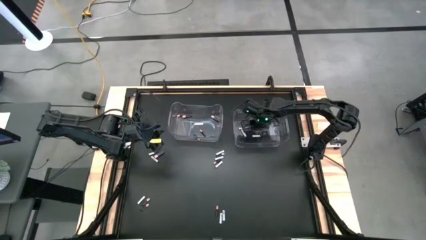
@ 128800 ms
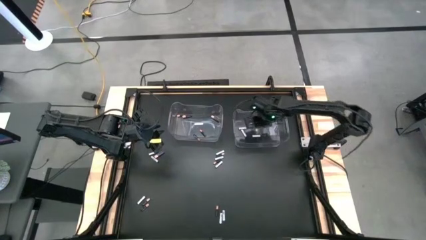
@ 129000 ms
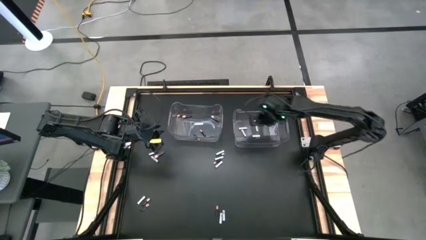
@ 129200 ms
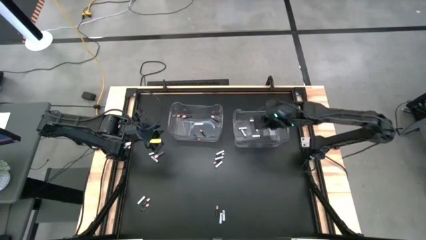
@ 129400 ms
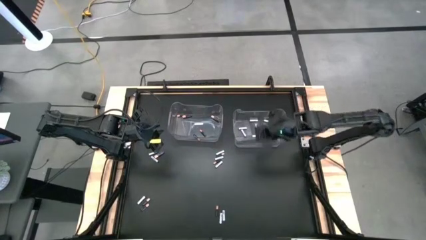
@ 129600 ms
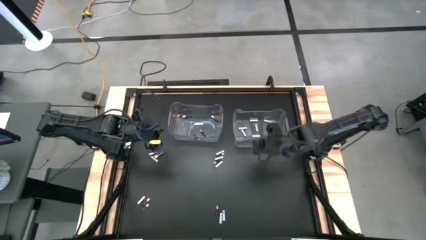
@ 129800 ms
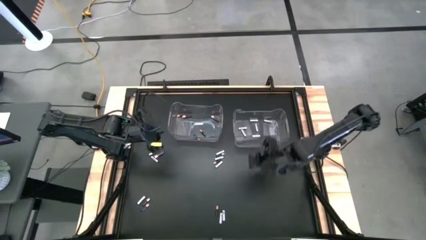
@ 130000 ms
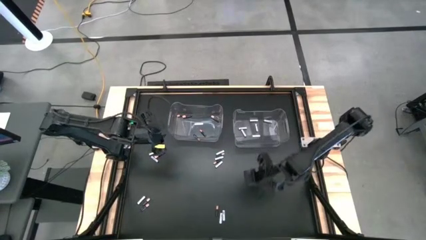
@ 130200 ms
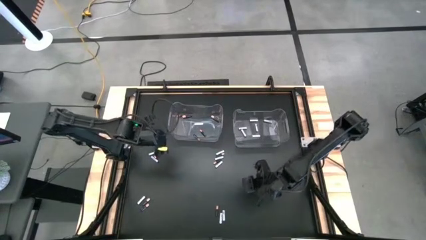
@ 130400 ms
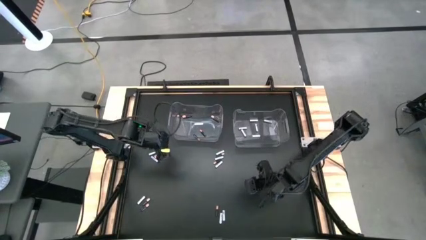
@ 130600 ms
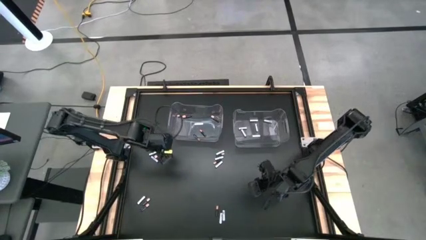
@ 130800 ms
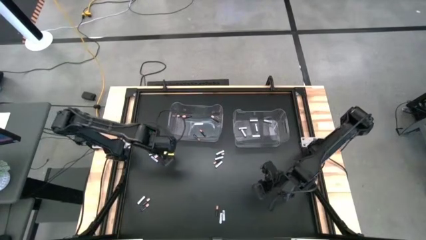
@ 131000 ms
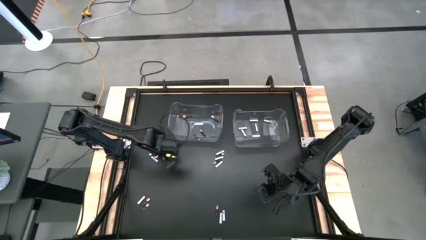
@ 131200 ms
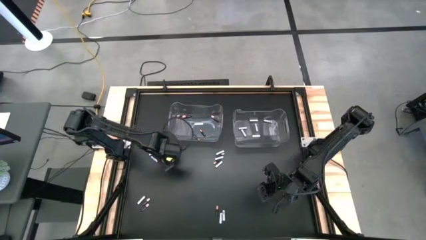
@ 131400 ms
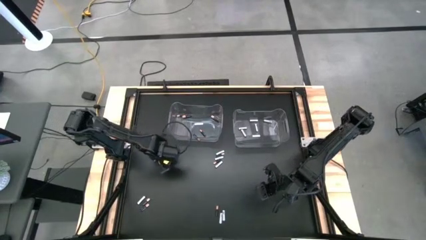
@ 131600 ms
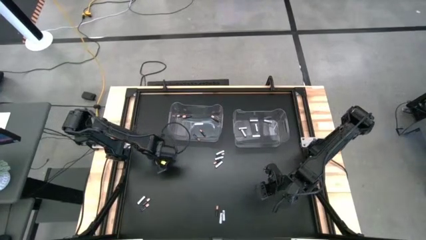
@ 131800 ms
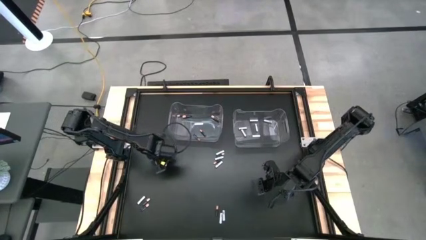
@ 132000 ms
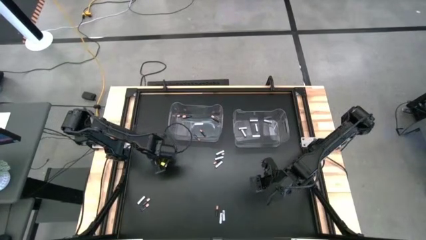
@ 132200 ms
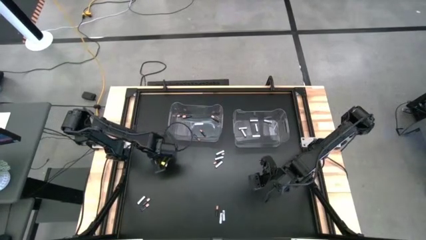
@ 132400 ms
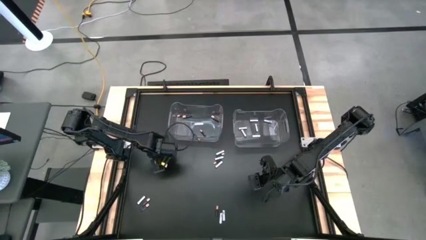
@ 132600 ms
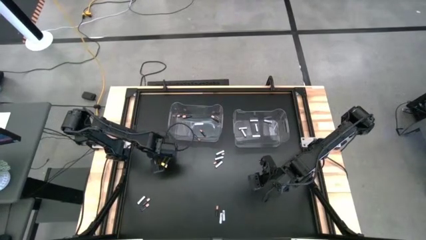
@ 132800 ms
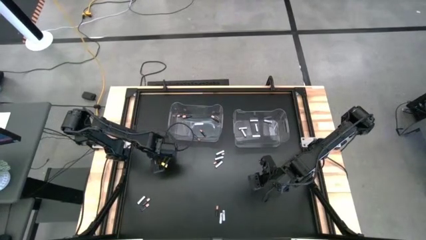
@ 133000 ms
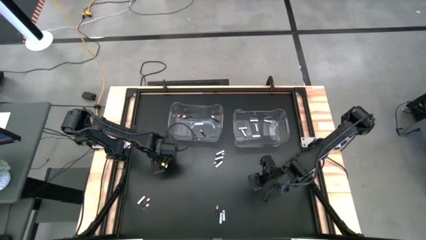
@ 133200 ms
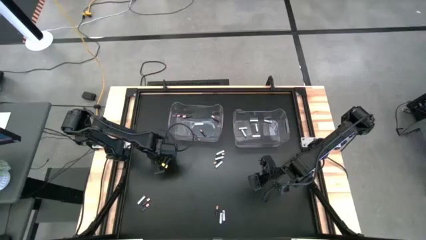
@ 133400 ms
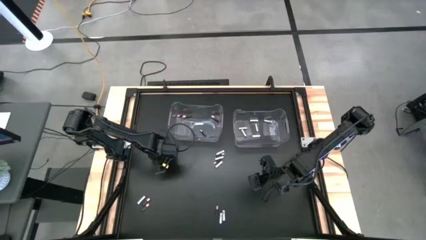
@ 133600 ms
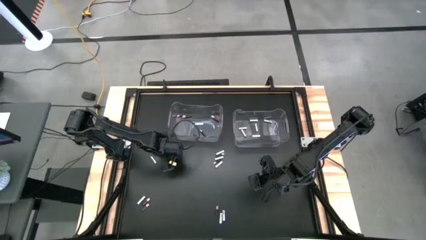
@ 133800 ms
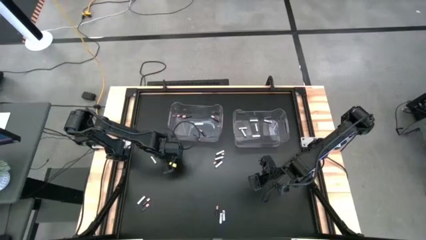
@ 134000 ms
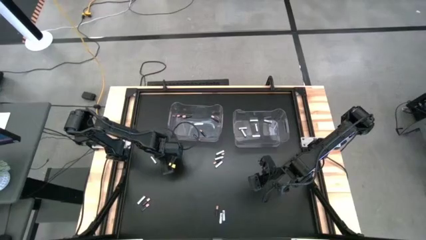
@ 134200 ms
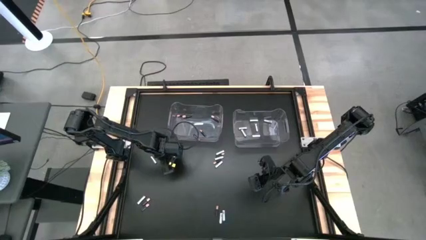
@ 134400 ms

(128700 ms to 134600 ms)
Task: Sort batteries
Put the black battery into the left transparent bin

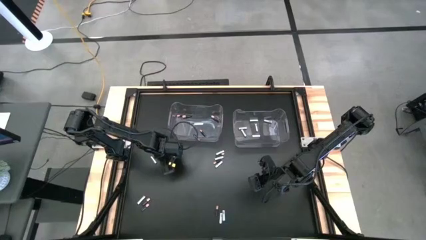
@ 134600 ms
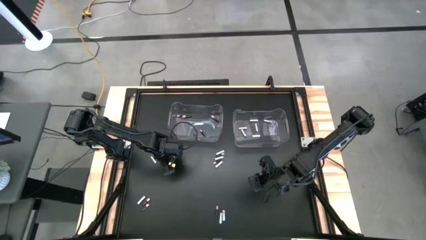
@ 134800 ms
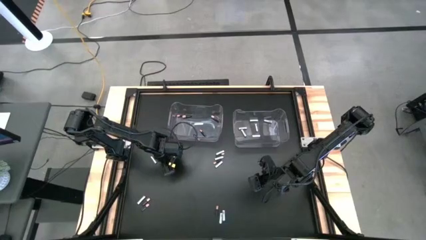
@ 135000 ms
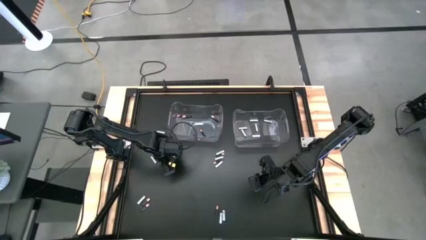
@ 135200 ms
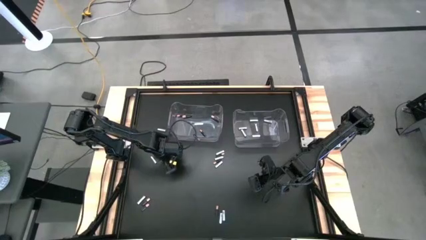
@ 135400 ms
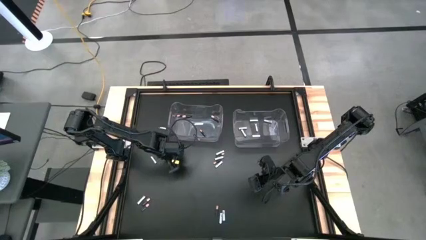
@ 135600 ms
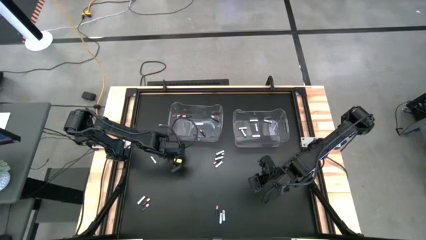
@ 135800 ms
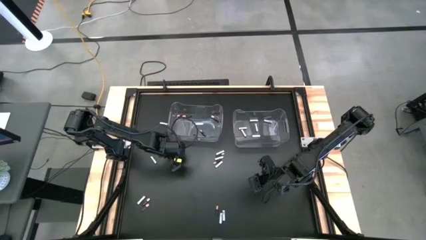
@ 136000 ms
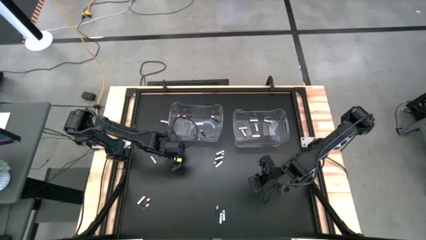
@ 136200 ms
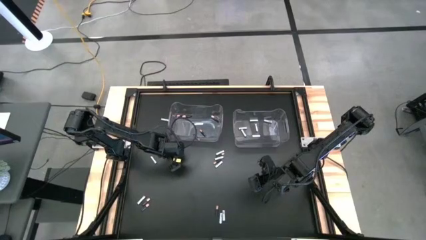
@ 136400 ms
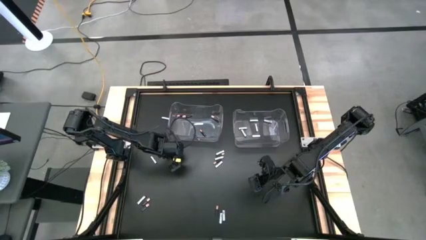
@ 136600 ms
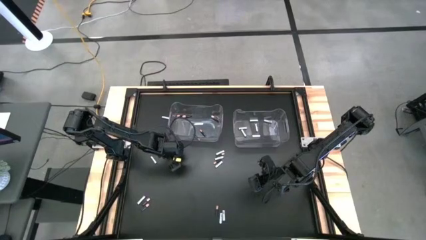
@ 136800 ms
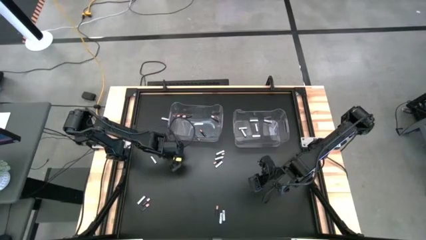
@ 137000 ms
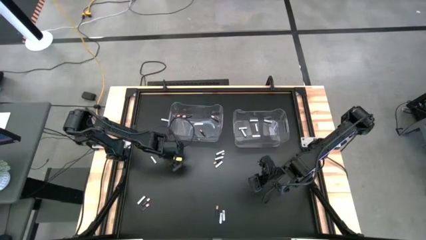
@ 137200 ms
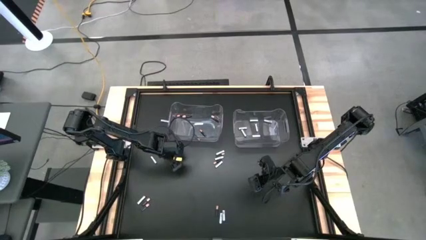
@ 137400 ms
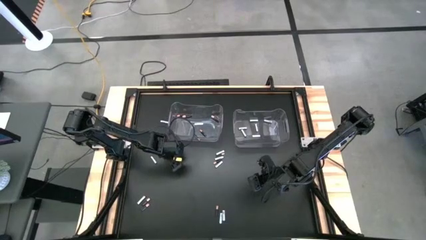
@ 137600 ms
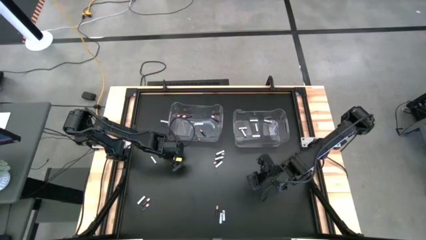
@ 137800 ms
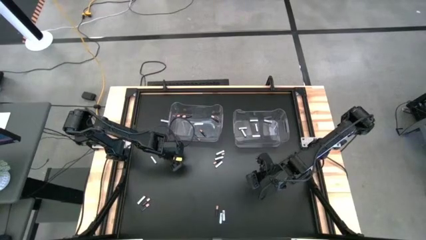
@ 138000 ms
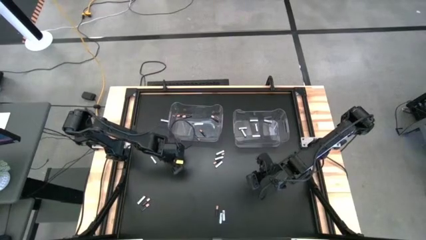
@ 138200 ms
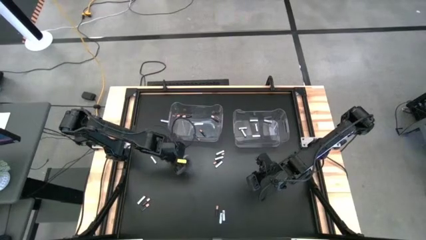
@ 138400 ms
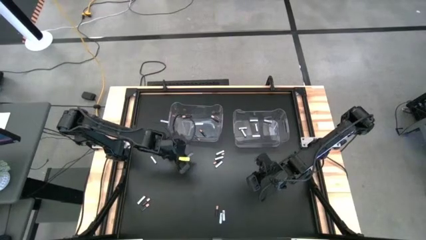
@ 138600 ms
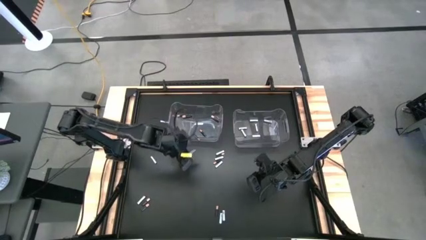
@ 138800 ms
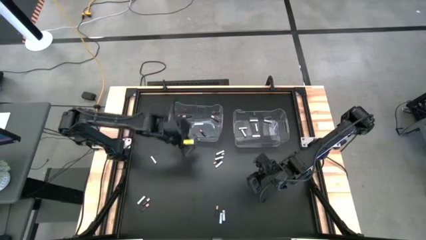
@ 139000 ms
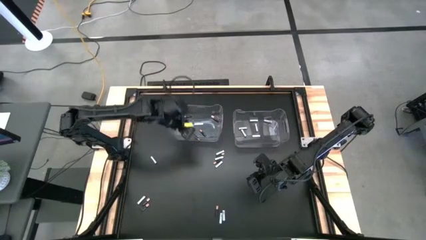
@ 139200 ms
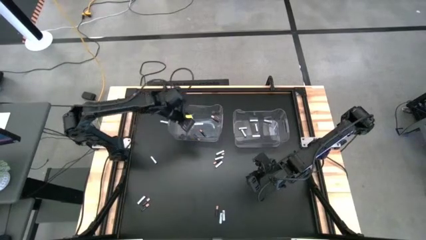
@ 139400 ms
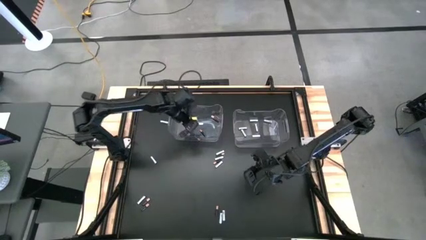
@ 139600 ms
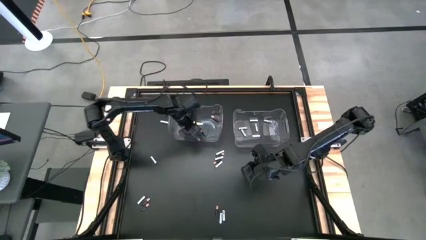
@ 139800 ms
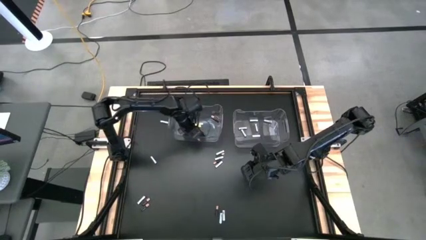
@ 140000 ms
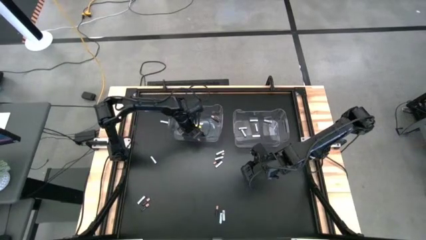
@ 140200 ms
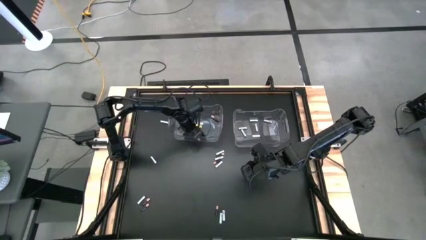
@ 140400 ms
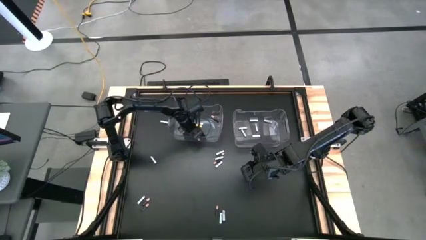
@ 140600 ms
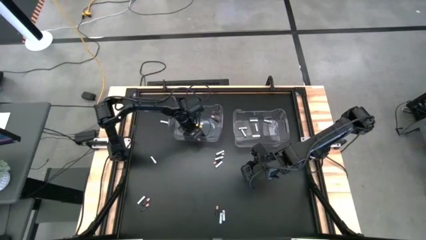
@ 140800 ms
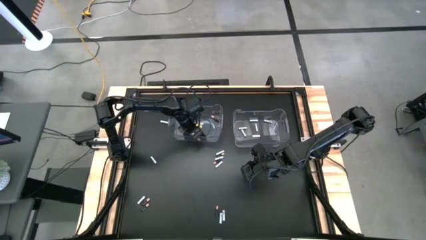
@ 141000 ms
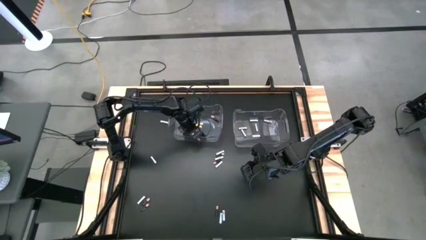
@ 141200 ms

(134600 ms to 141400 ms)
Put the black battery into the left transparent bin

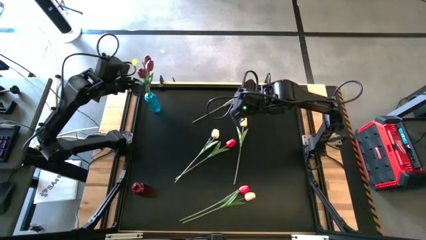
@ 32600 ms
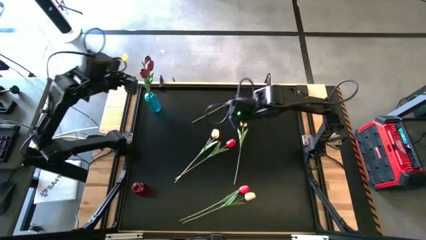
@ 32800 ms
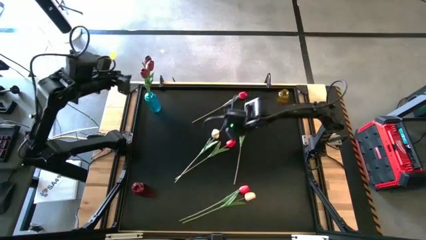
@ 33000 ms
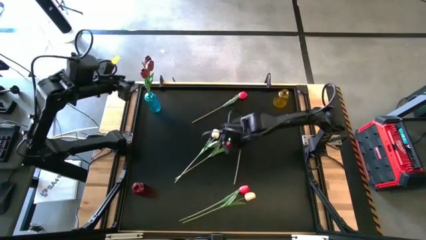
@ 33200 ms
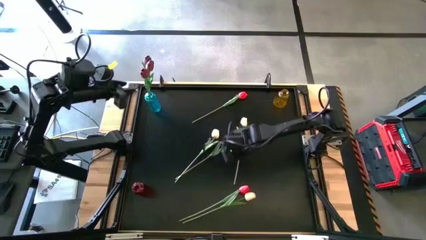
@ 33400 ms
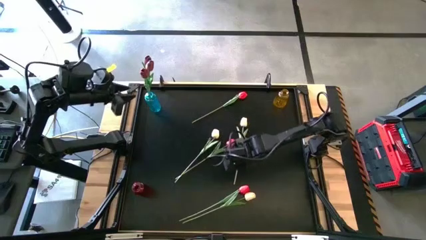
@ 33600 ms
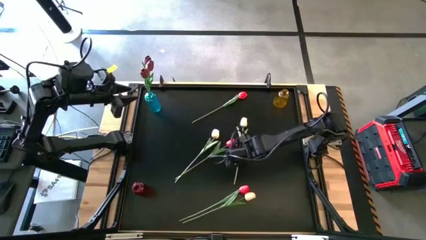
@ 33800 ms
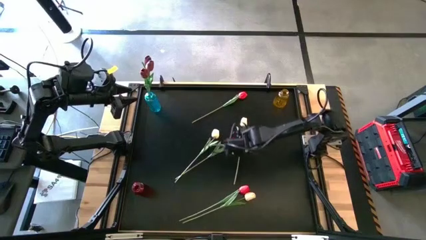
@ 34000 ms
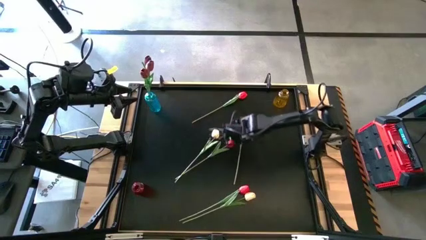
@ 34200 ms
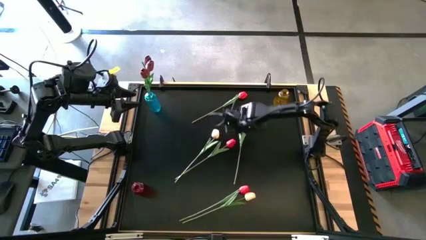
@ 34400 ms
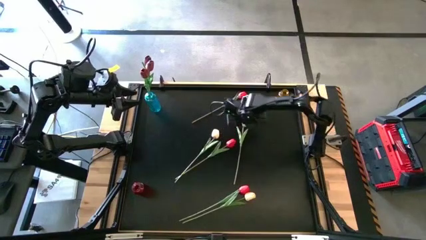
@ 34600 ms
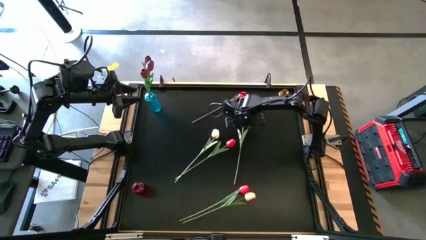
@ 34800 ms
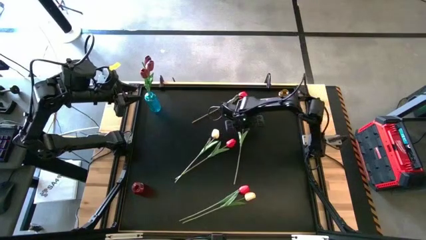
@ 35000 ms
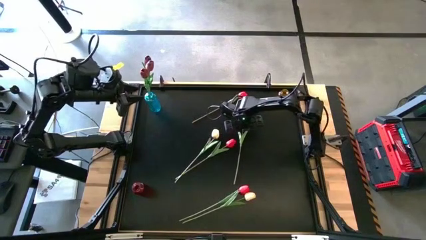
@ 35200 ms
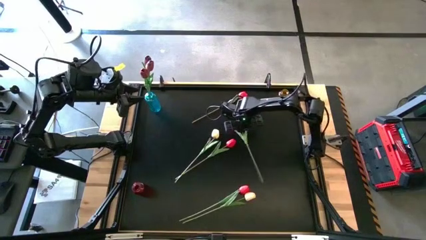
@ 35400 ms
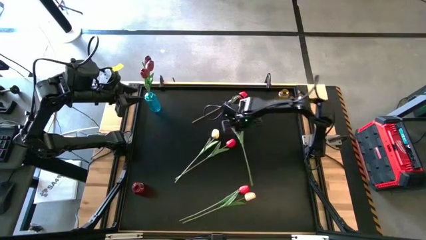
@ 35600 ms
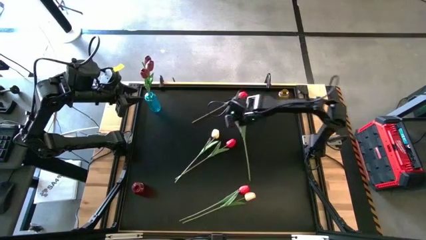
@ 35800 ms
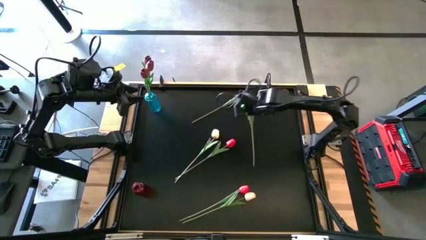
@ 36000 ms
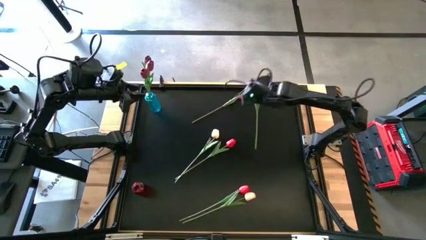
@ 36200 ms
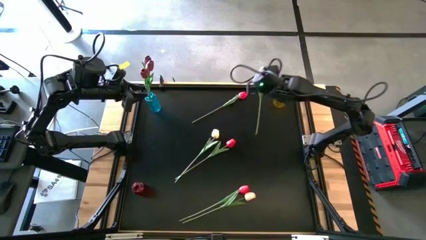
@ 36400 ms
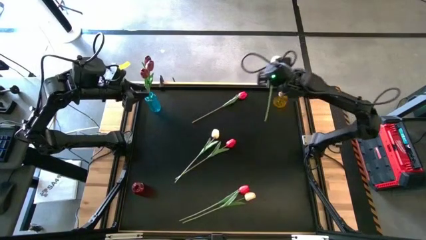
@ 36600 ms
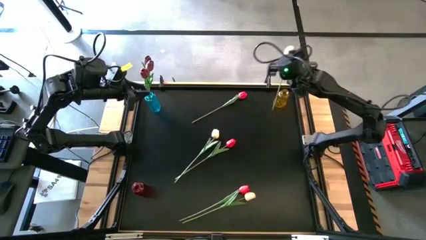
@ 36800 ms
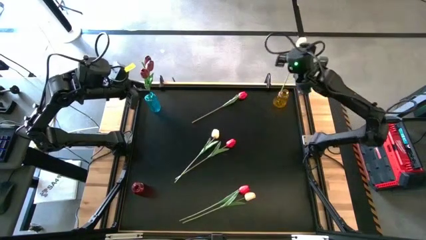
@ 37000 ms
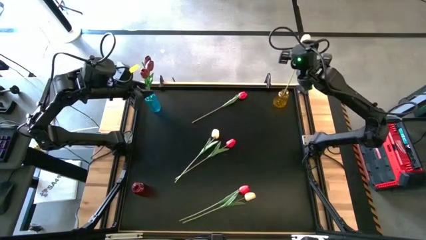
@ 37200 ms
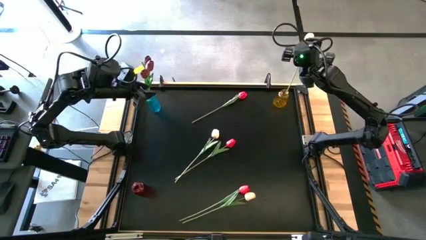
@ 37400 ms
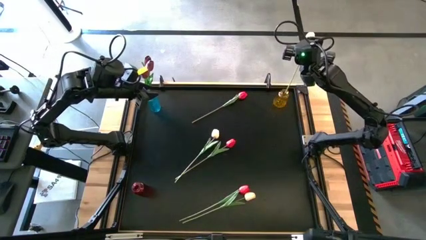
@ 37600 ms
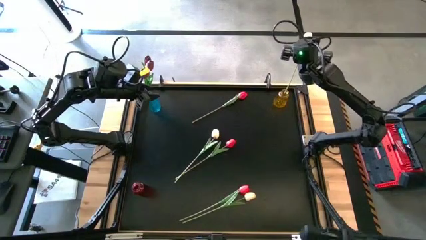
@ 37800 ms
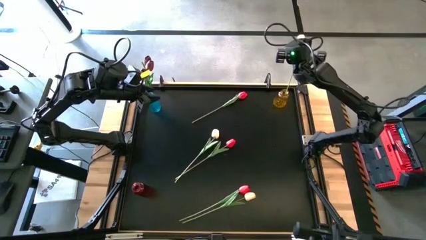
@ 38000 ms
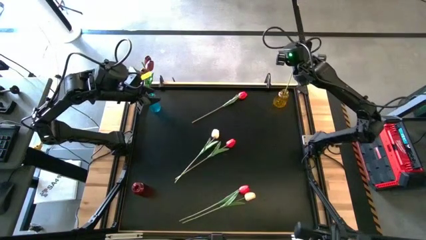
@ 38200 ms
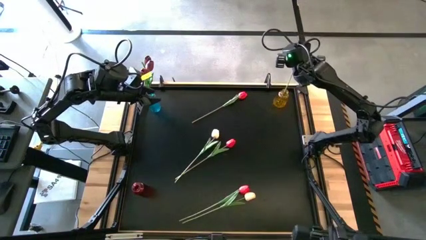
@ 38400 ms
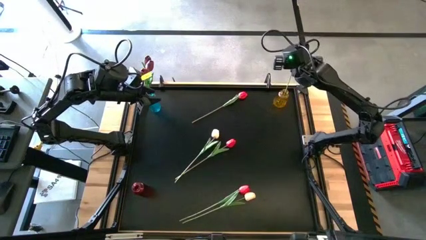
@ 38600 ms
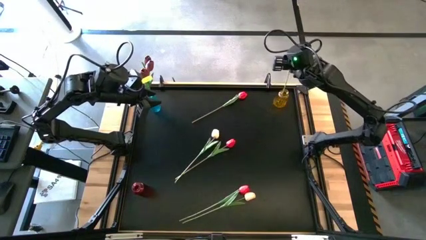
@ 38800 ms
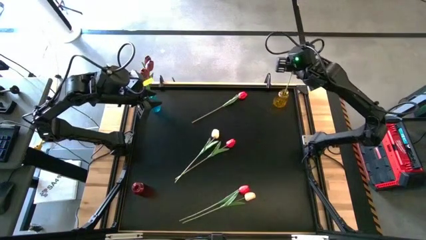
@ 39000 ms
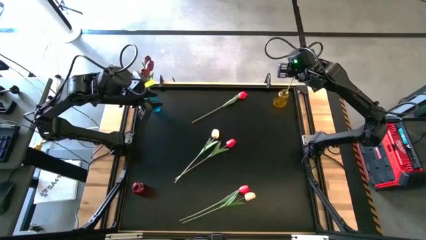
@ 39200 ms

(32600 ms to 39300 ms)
Task: Sort flowers into vase by color
Put the center yellow flower into the yellow vase
